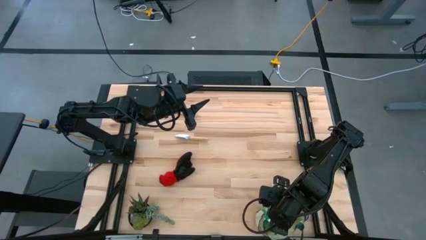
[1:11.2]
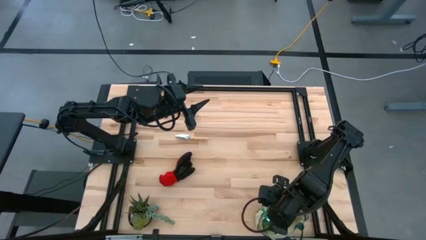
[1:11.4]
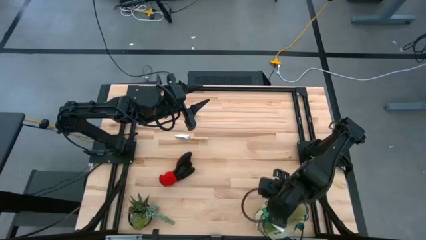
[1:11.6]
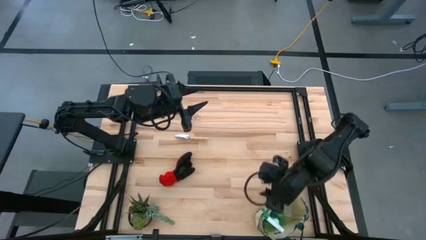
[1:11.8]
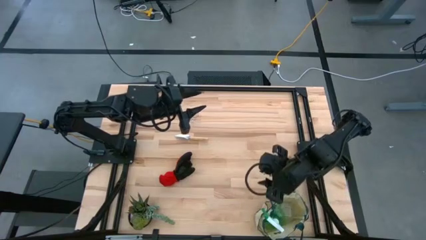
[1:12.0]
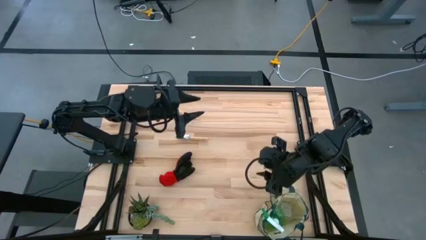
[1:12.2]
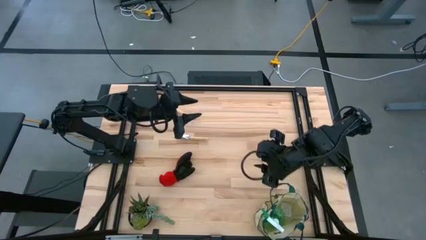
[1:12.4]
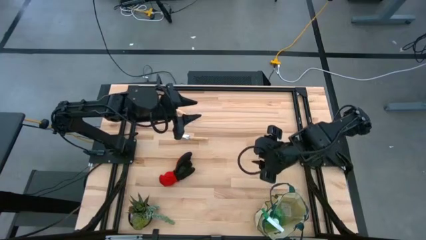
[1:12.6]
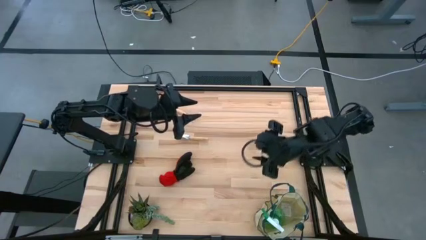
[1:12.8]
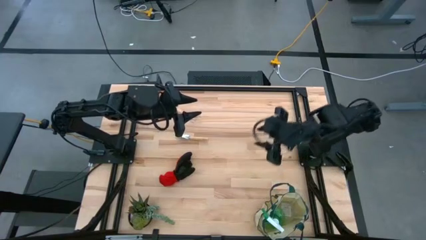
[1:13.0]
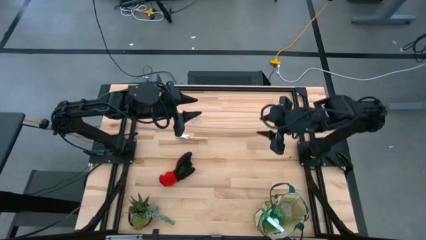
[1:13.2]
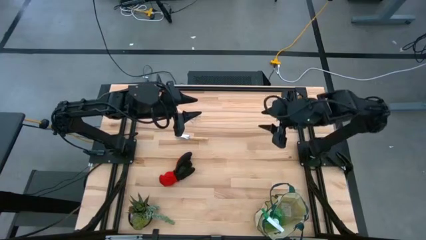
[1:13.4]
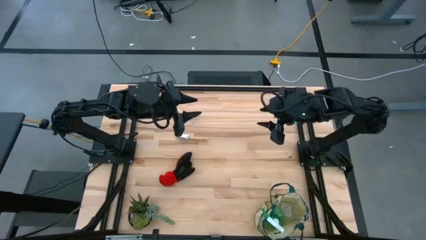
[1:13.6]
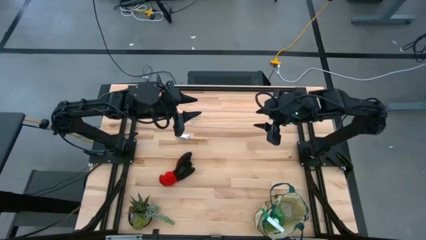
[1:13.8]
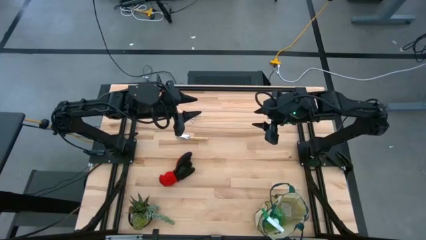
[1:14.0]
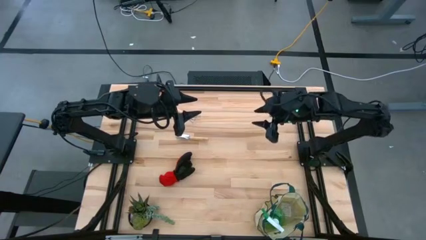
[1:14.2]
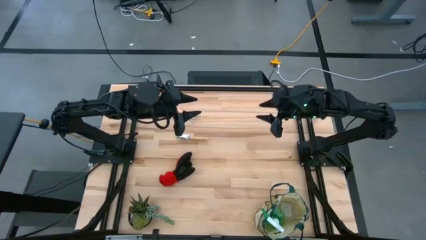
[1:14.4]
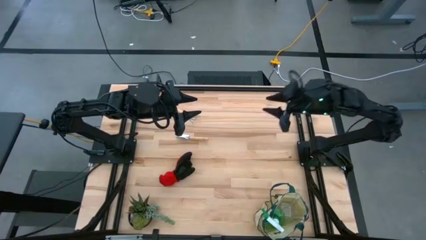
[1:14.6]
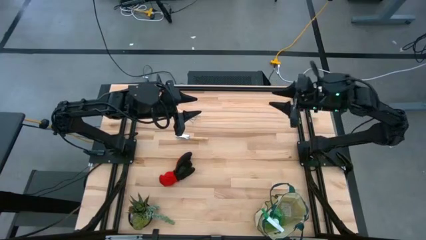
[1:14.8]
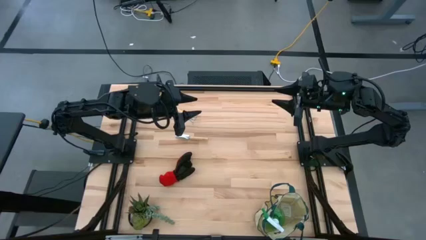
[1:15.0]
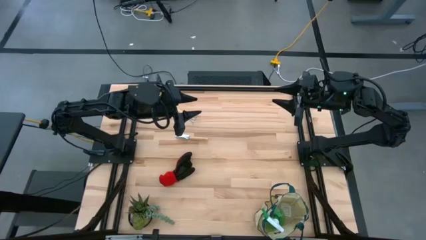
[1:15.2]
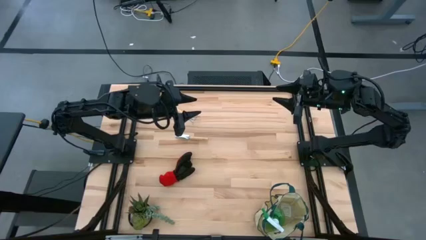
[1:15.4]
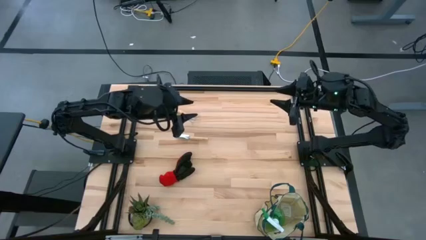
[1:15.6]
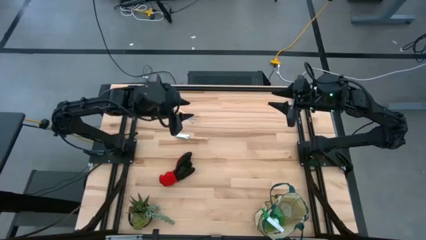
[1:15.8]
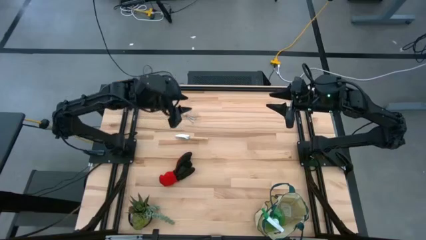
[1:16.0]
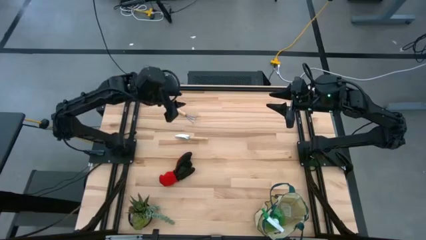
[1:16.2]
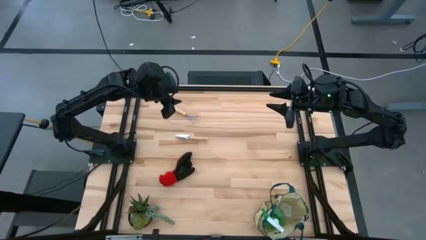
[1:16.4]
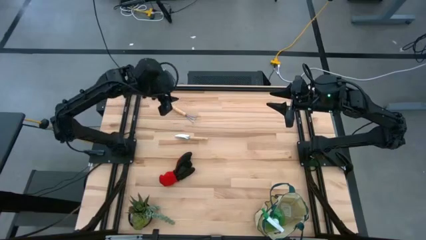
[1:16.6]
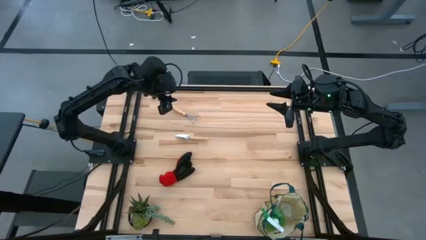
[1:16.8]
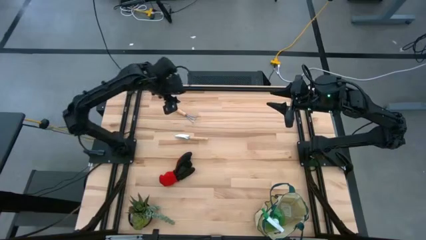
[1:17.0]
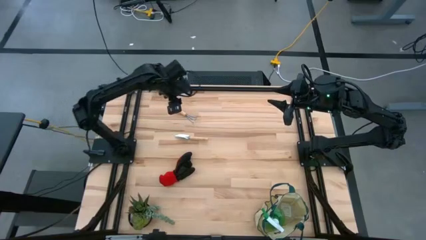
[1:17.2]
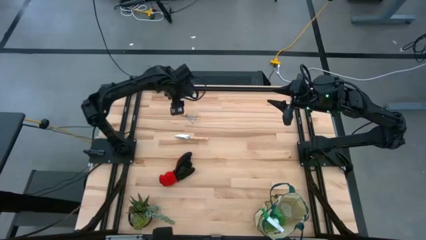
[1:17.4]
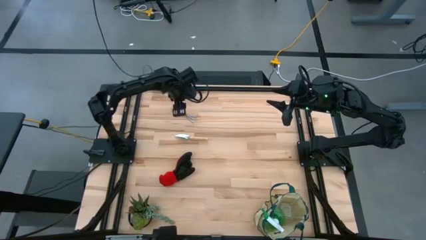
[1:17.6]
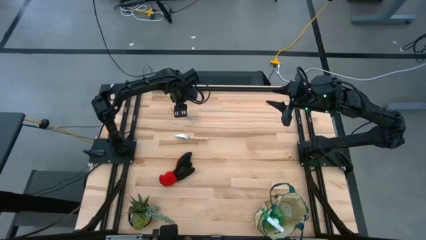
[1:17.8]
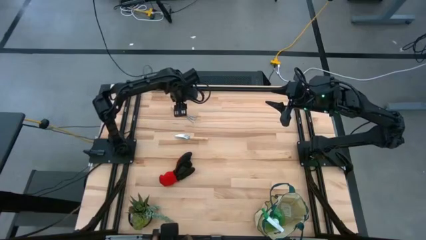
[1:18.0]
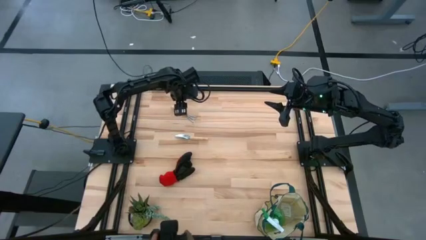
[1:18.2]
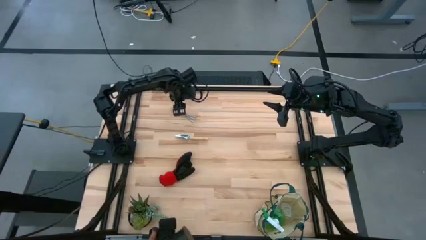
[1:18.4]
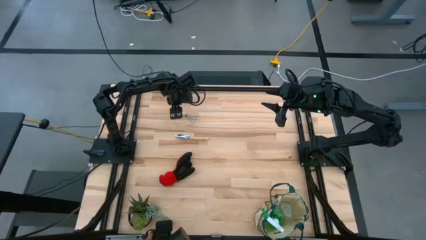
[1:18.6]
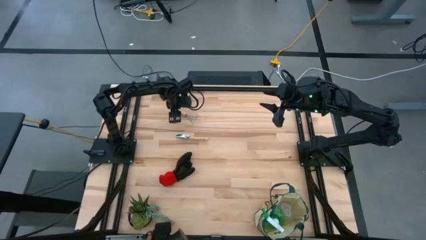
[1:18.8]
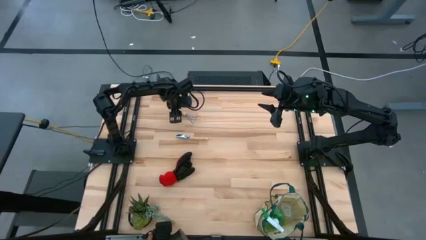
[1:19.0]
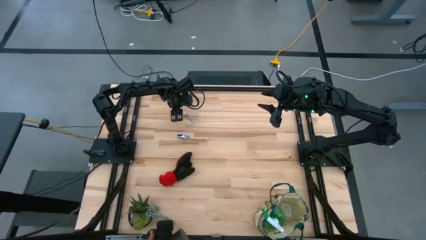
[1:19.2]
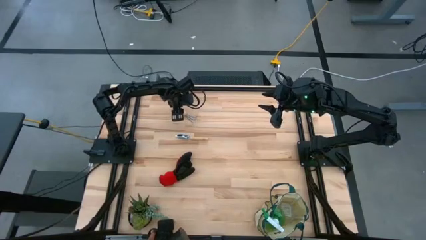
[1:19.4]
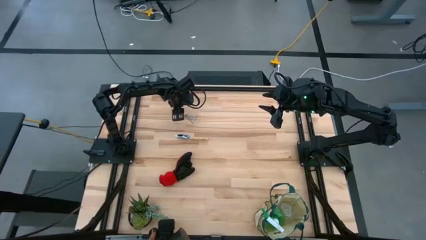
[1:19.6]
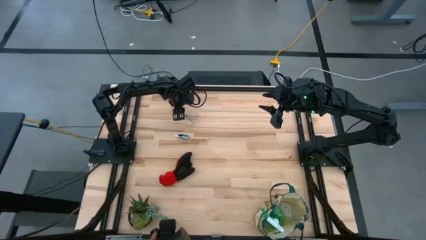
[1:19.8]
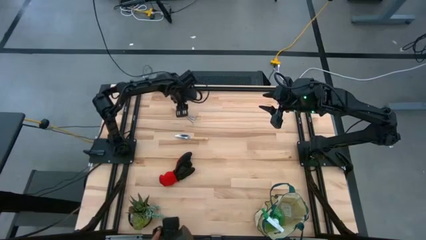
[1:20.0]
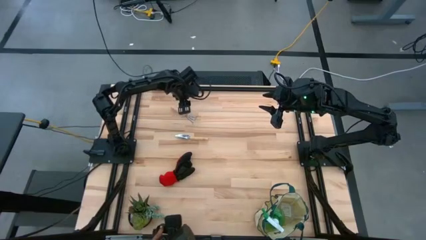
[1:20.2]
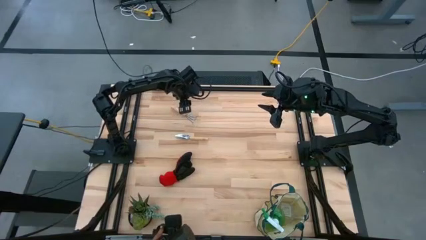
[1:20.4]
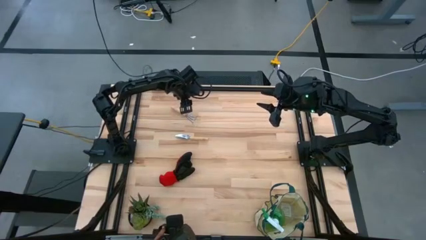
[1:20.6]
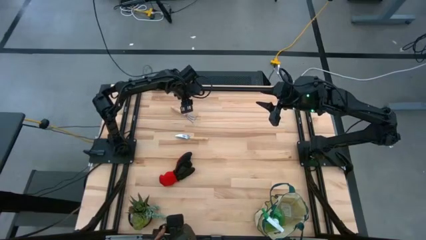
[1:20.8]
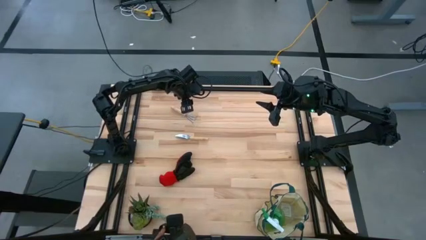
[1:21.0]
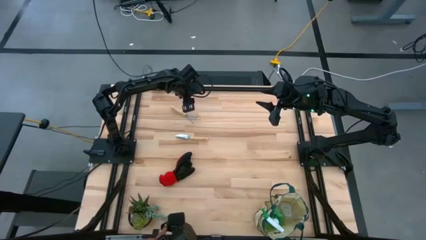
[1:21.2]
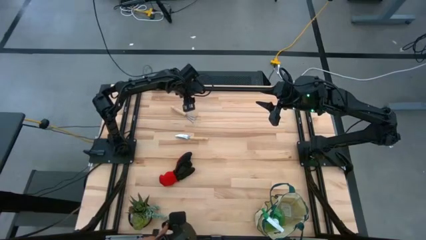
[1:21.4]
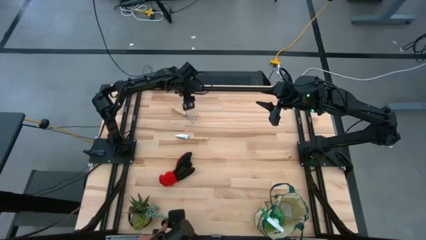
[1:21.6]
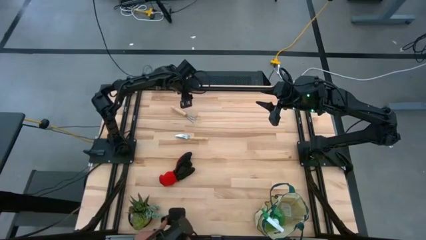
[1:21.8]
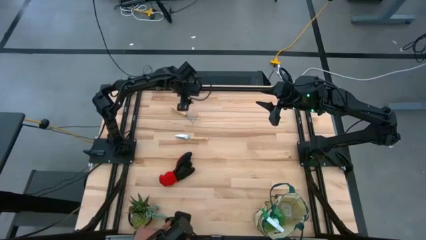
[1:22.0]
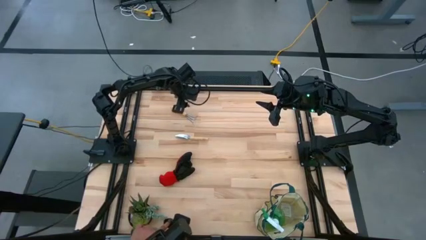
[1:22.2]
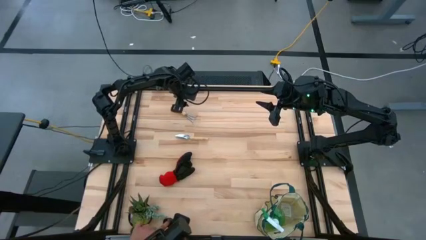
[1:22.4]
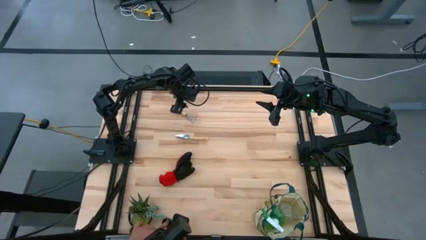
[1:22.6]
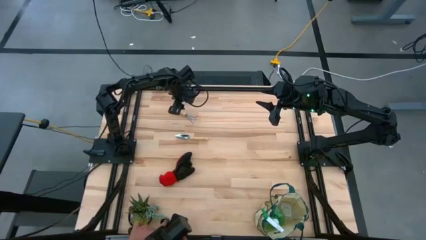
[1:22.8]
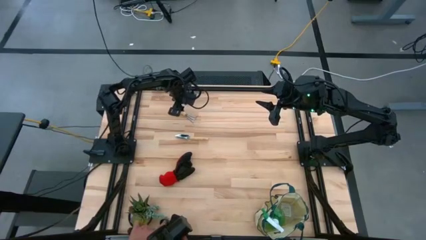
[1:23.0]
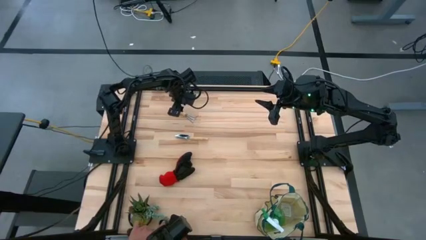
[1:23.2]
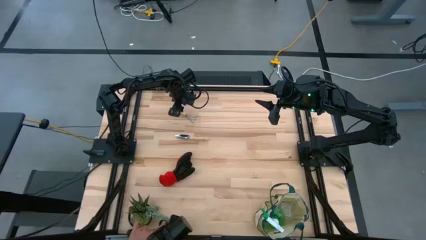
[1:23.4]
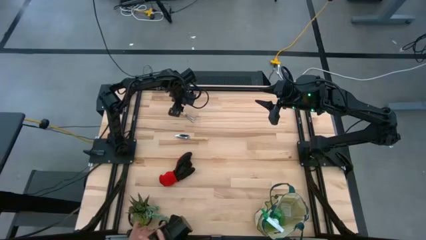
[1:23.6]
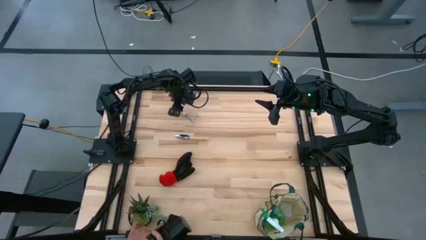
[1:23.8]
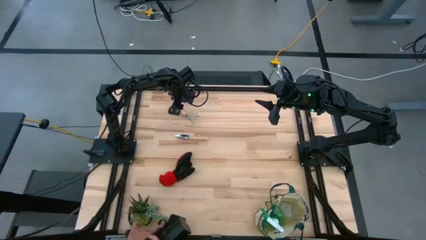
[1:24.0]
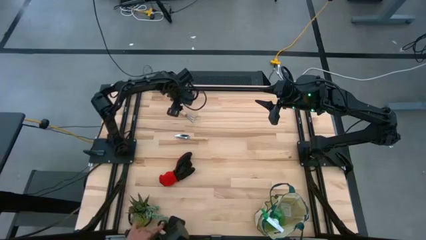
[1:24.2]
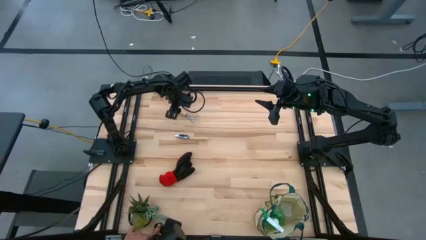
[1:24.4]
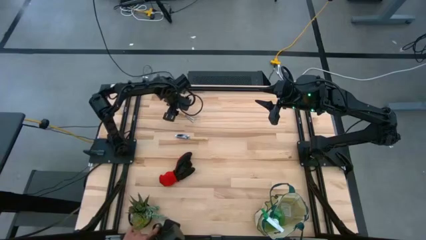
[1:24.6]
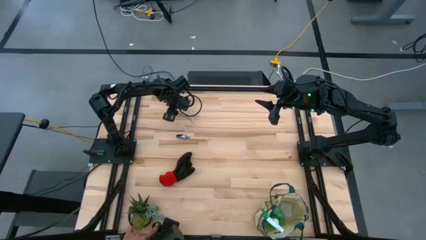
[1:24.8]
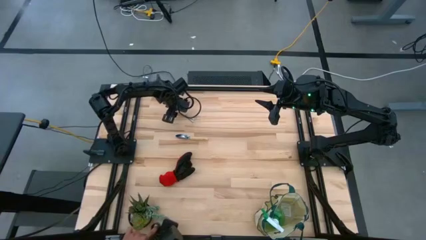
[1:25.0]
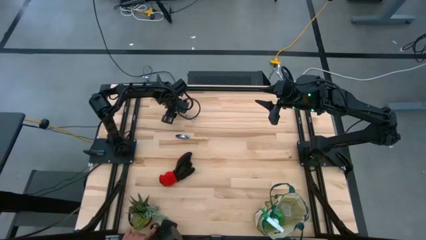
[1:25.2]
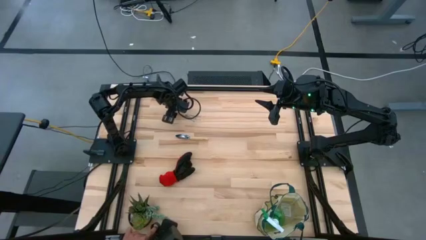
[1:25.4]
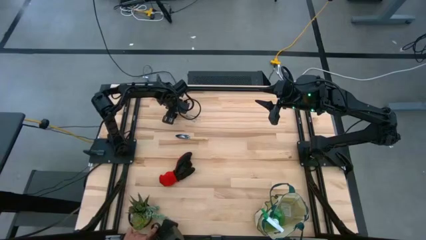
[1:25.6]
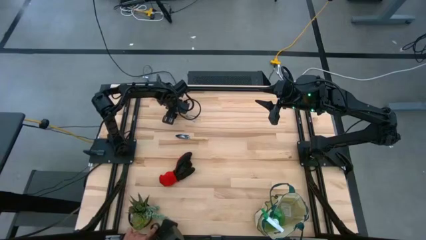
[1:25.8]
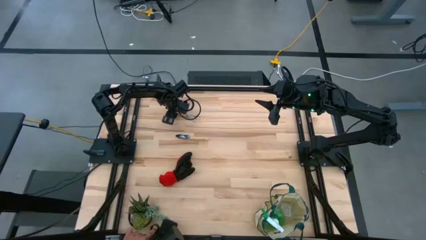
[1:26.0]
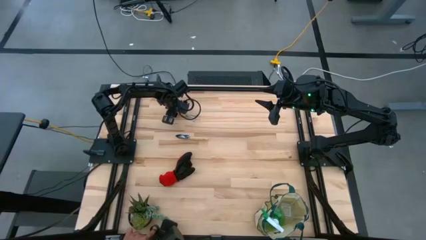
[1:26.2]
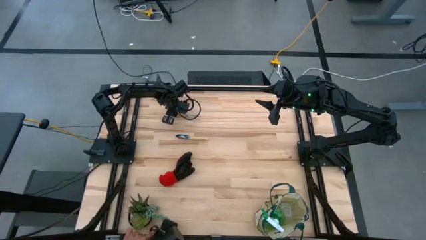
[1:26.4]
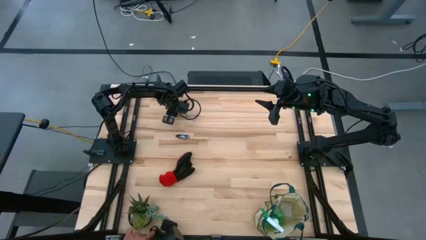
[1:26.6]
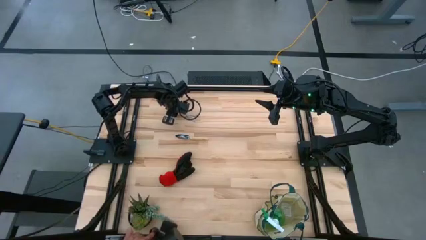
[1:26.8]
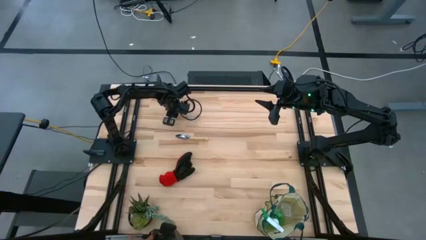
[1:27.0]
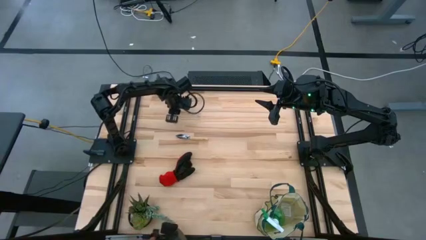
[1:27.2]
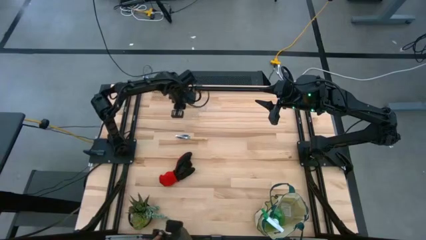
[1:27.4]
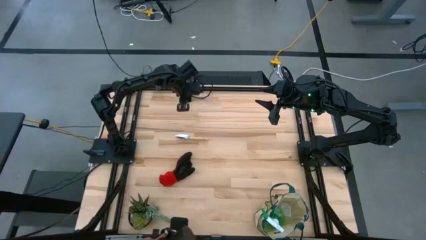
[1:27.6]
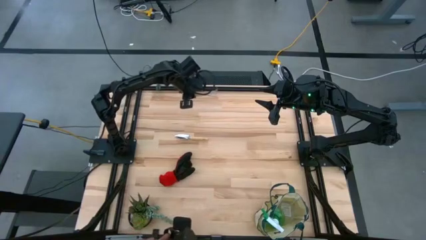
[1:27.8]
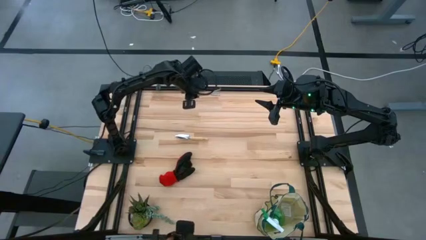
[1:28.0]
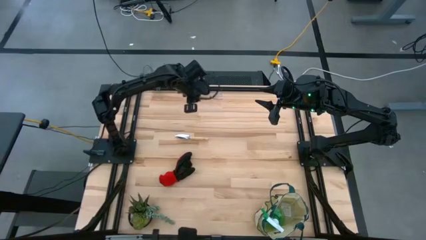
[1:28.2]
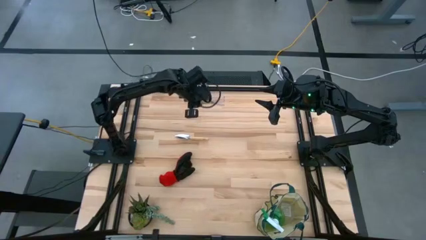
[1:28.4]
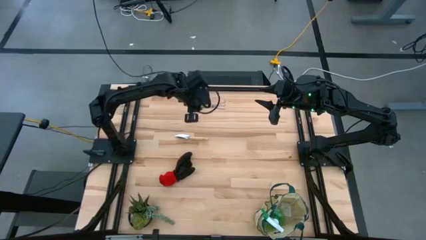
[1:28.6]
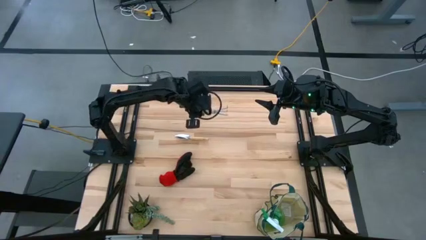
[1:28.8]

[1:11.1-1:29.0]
Task: Pick & Place Garden tools in Gardening bag
Put the brown hand rake into the gardening bag
